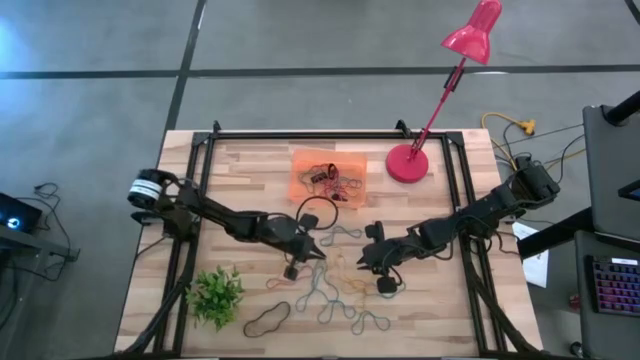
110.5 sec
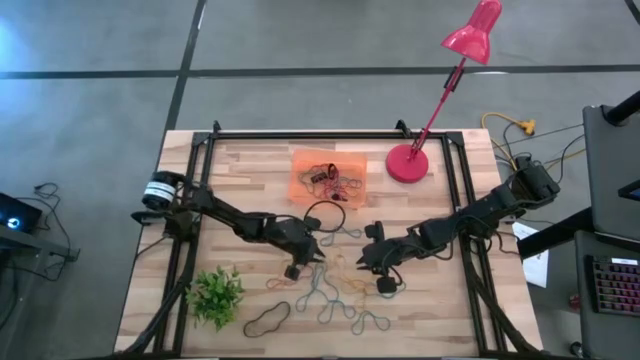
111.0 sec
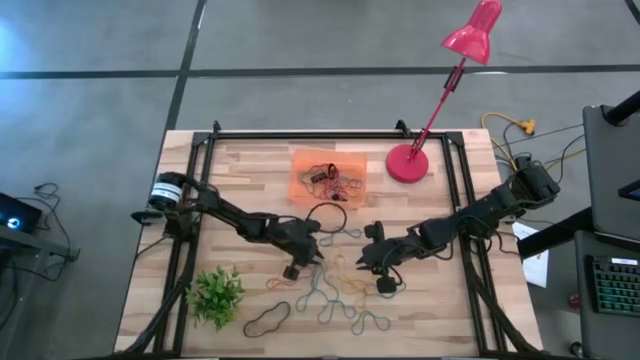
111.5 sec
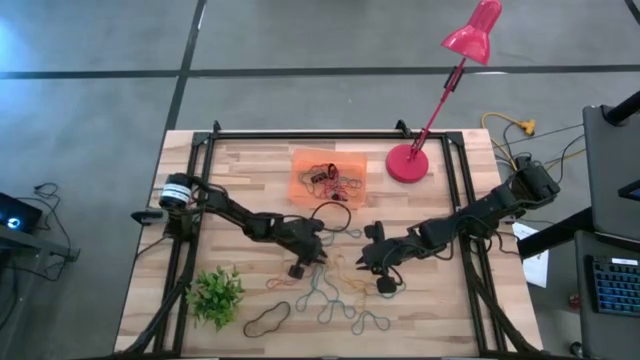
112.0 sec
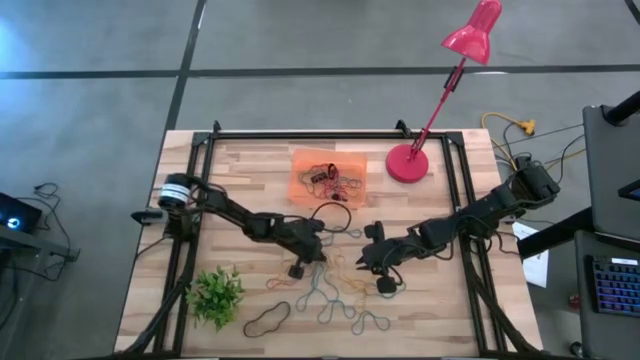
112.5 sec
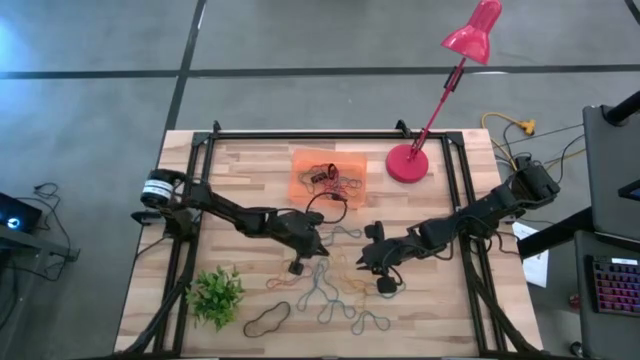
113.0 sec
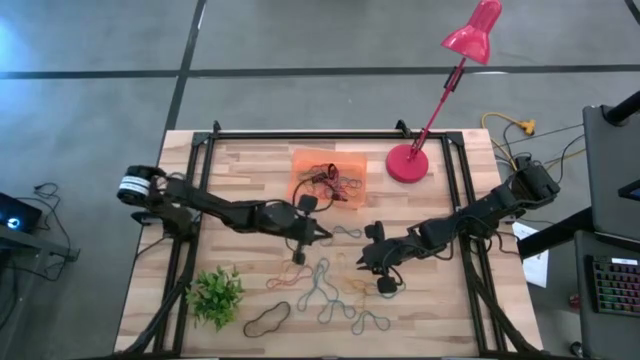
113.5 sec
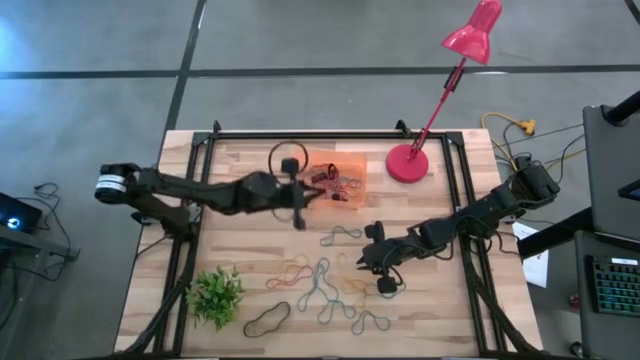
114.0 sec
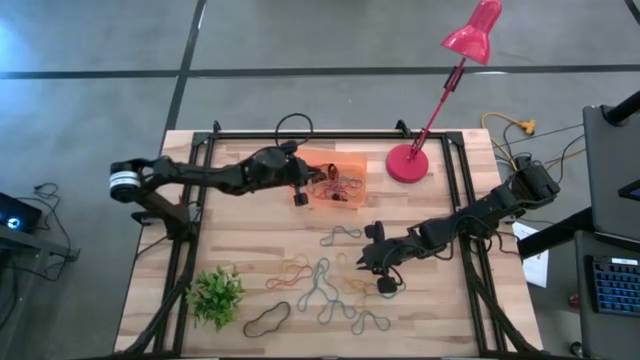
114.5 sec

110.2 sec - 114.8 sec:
Task: Pick and place rubber bands into bin
Put the yellow rubber band into the orange bin

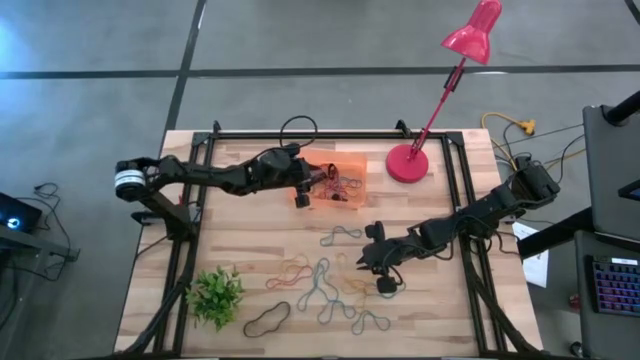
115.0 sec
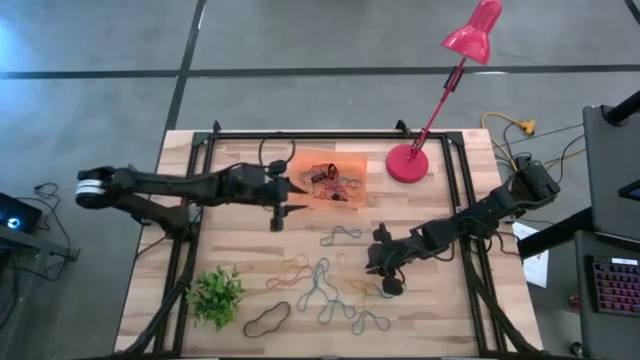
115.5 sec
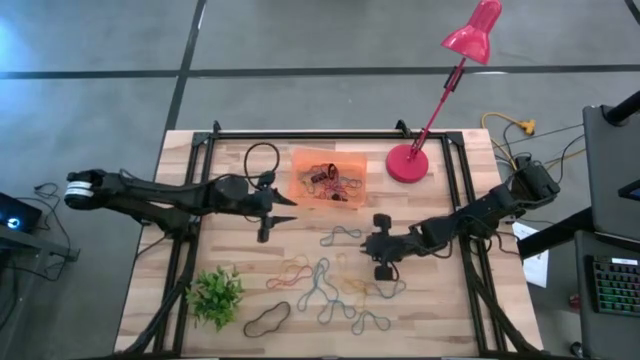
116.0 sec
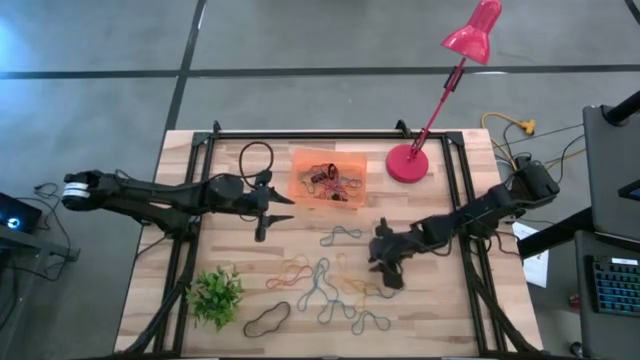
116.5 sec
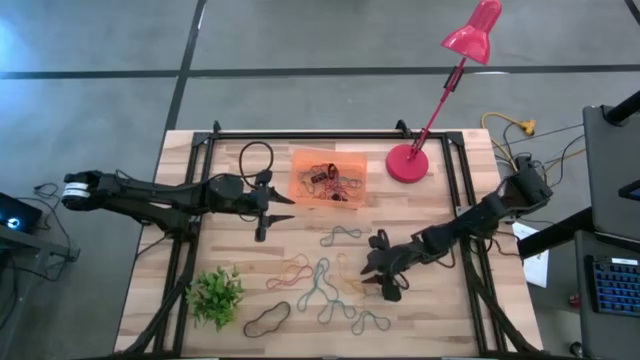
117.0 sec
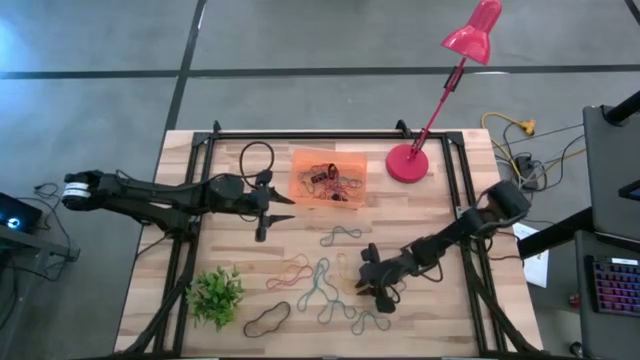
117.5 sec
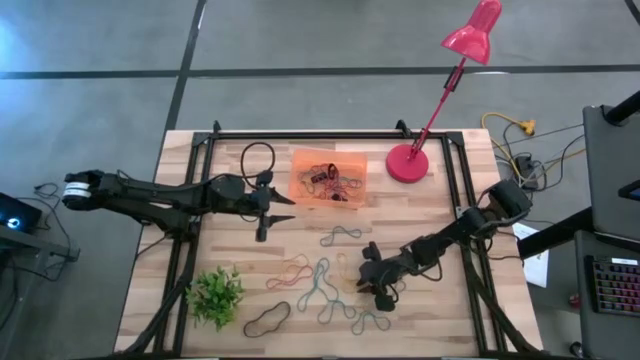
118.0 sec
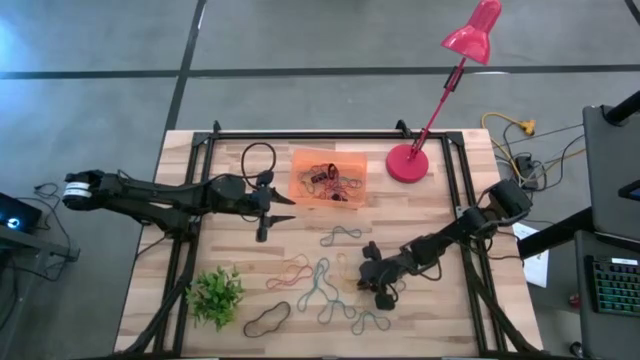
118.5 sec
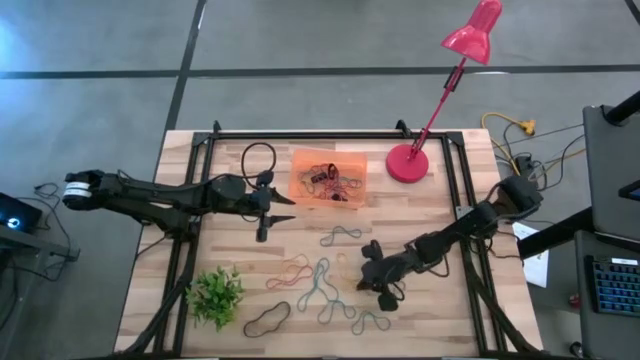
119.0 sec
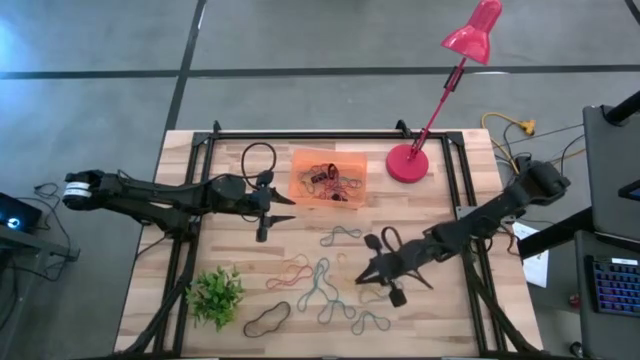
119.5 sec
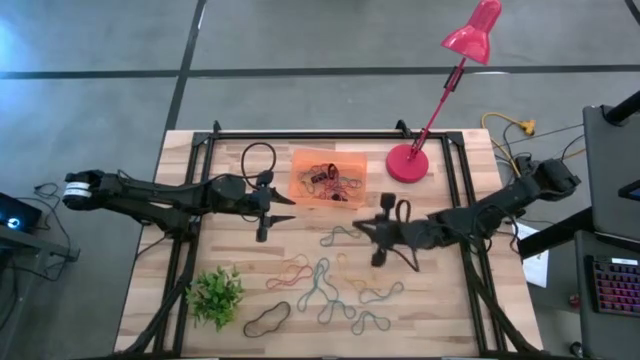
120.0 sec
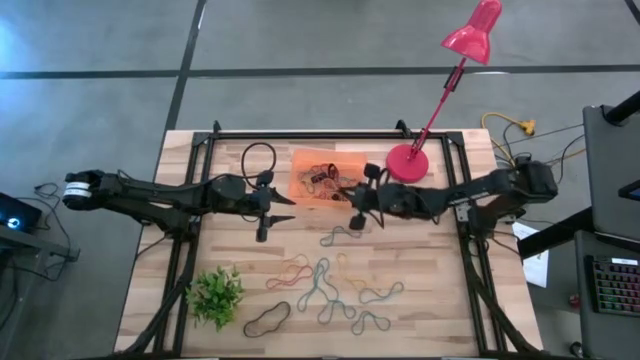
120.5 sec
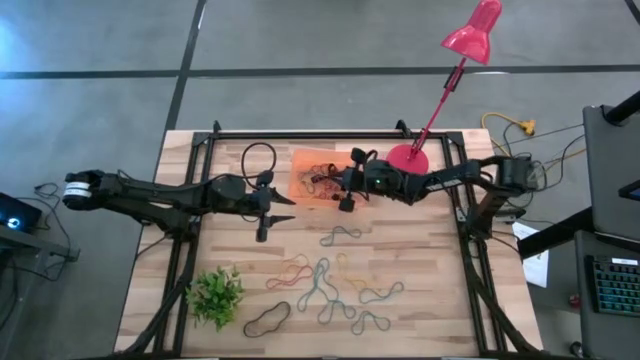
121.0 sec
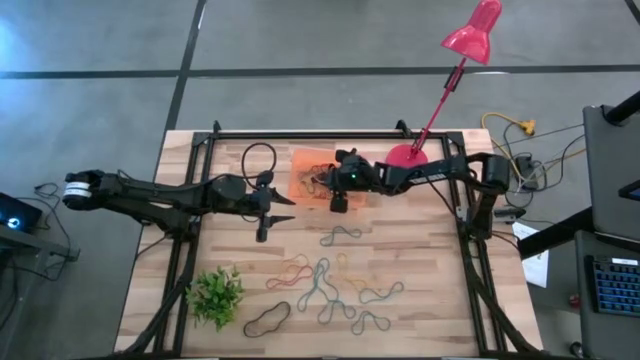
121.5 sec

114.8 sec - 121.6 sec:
Put the yellow rubber band into the orange bin

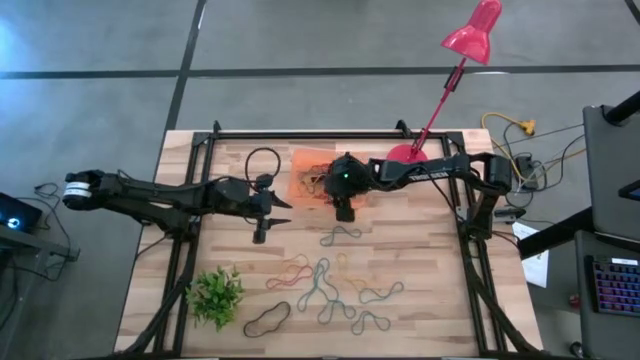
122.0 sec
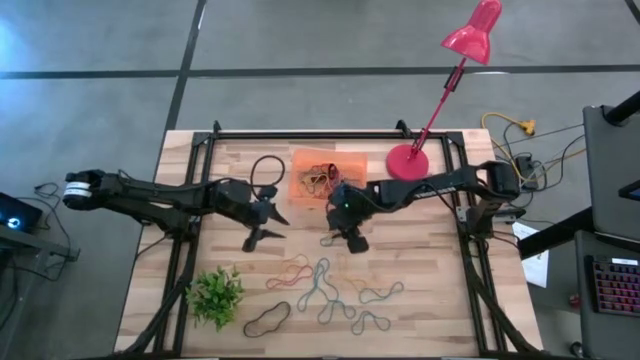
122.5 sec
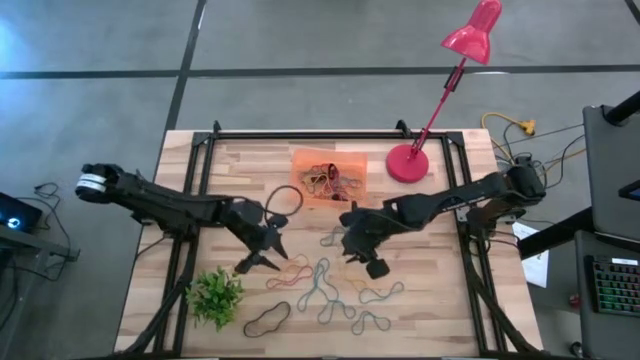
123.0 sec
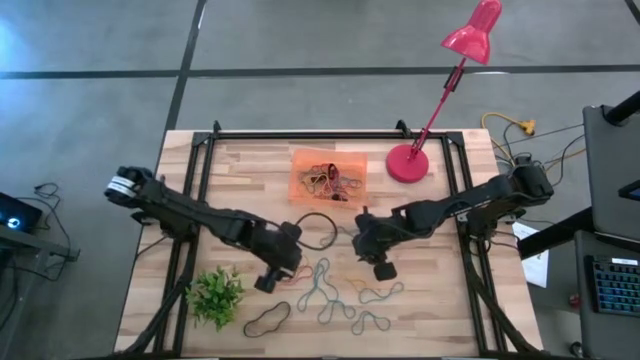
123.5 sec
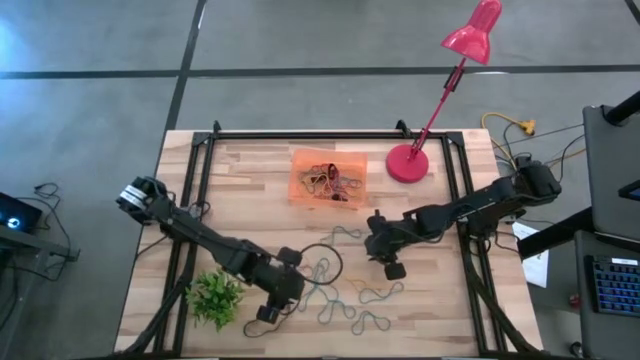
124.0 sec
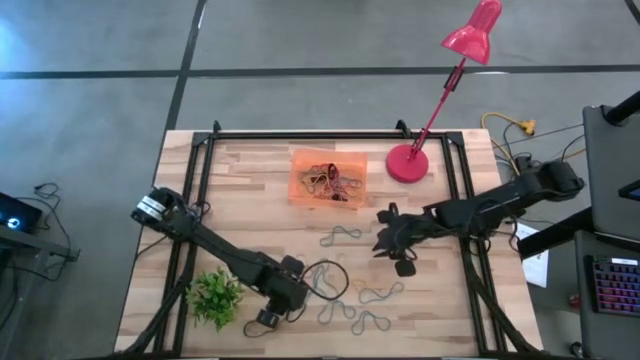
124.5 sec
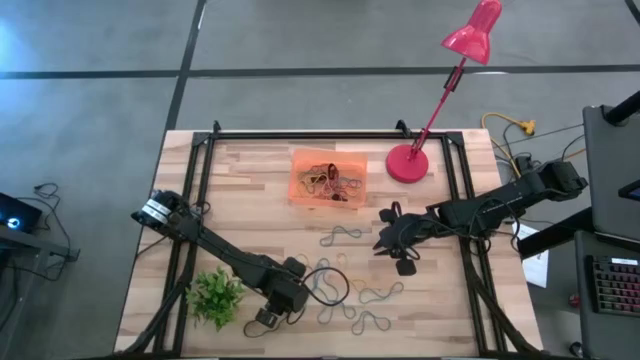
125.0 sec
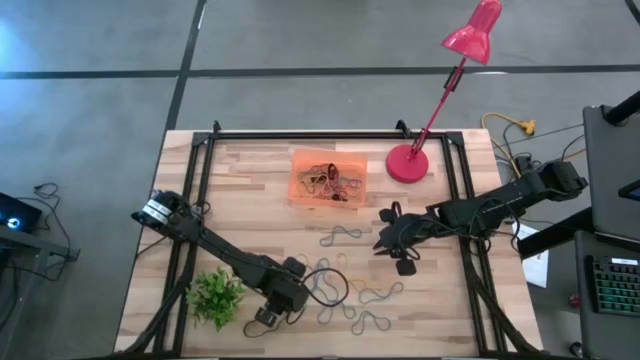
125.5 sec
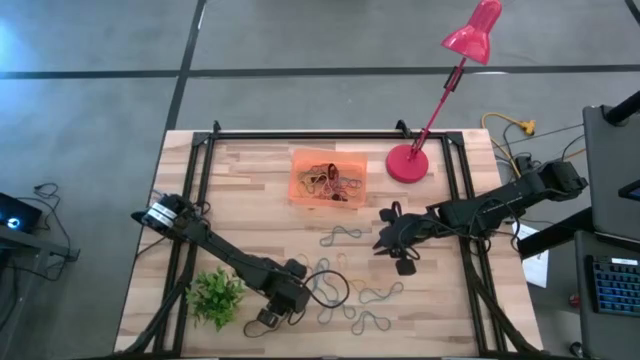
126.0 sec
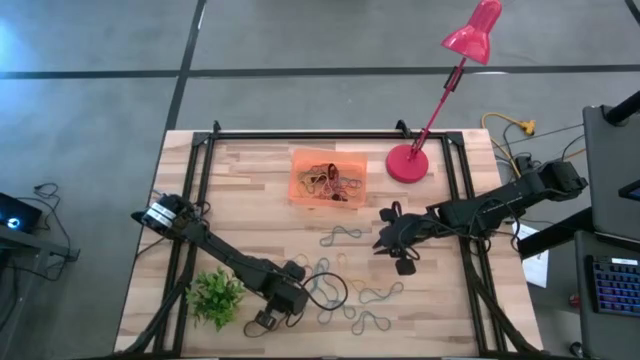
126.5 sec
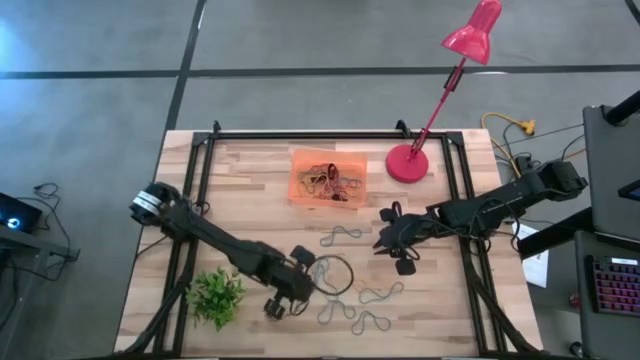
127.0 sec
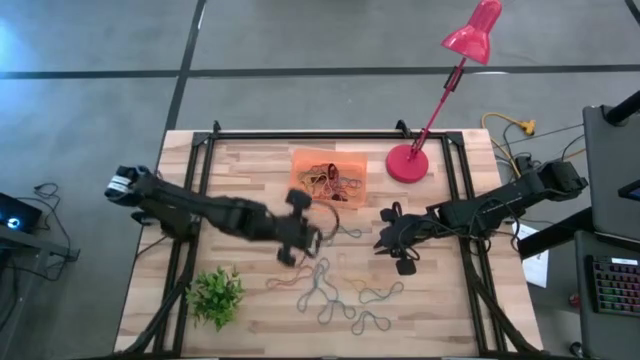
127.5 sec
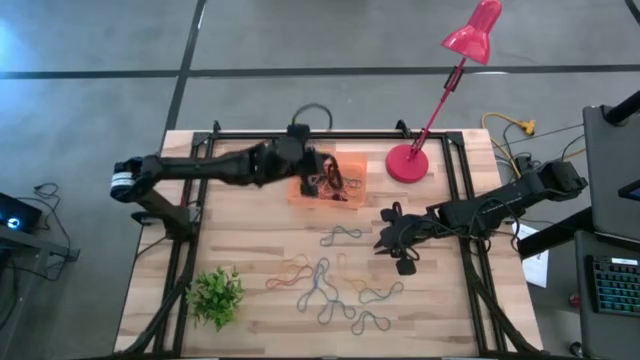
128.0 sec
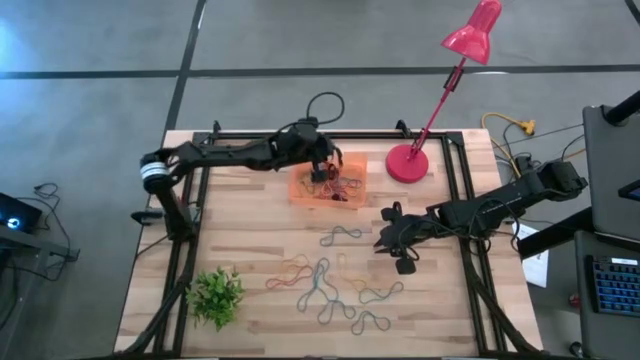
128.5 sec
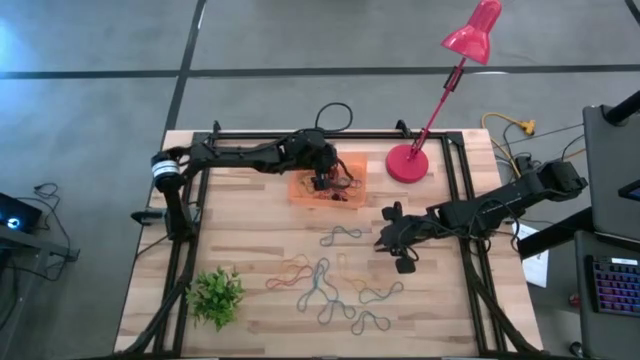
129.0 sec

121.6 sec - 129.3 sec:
Put the black rubber band into the orange bin

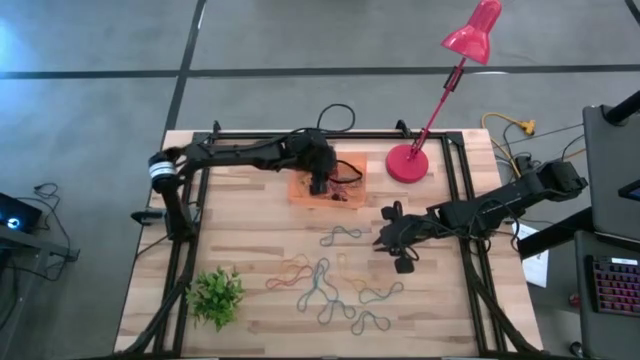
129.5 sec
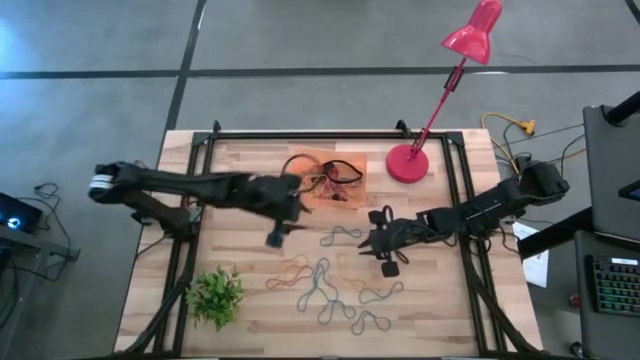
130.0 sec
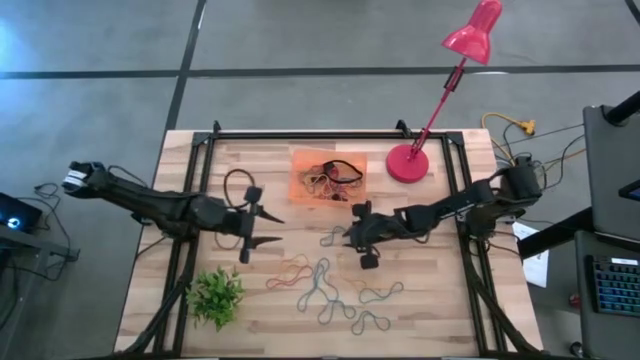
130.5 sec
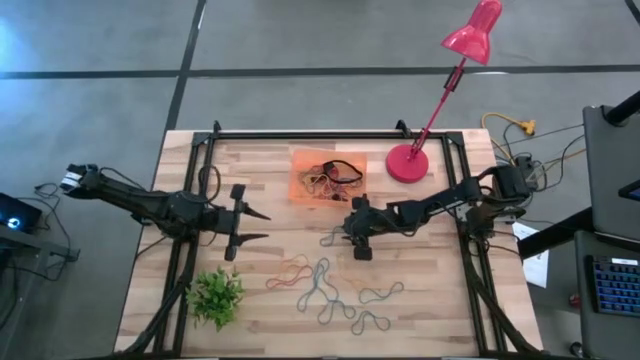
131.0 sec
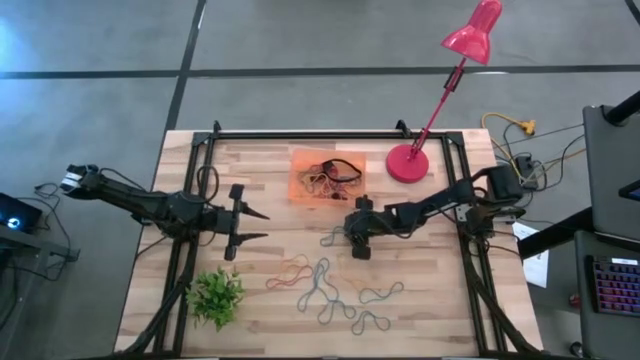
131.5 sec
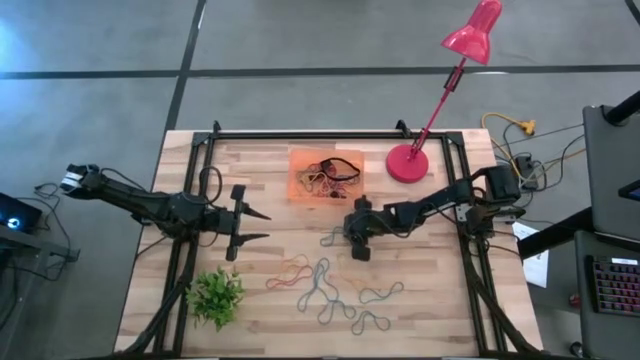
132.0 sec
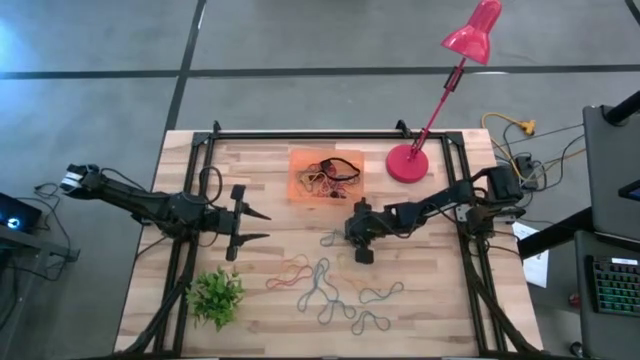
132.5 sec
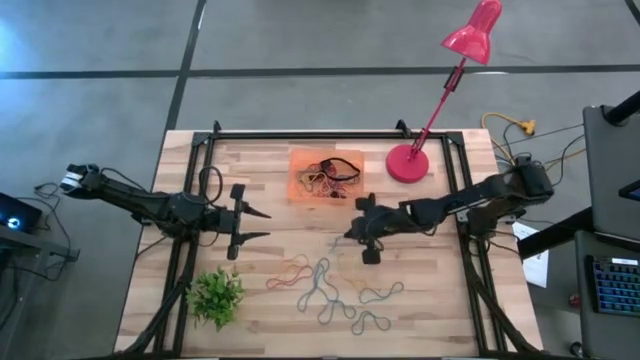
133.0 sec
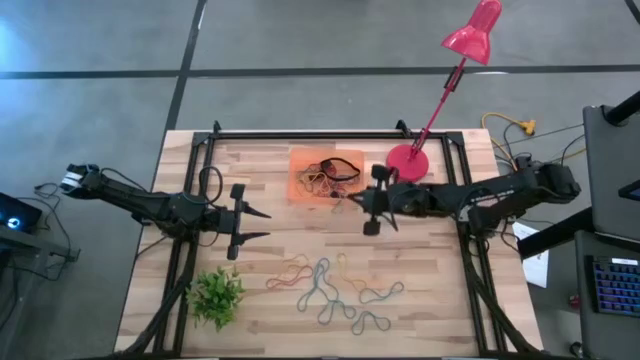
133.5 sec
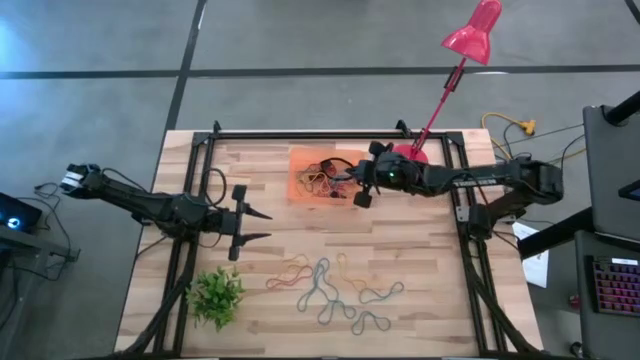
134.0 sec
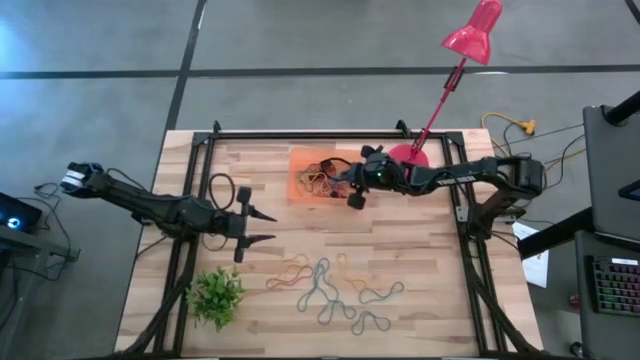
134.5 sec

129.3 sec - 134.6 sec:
Put the blue rubber band into the orange bin
